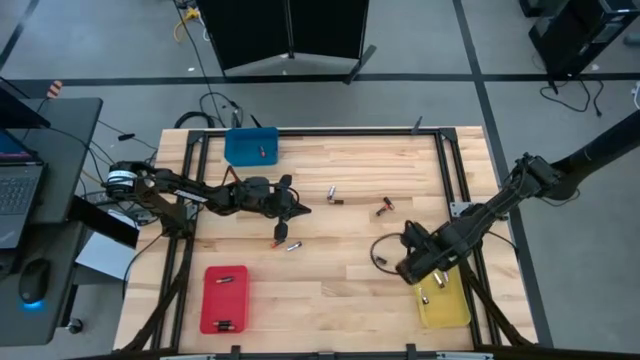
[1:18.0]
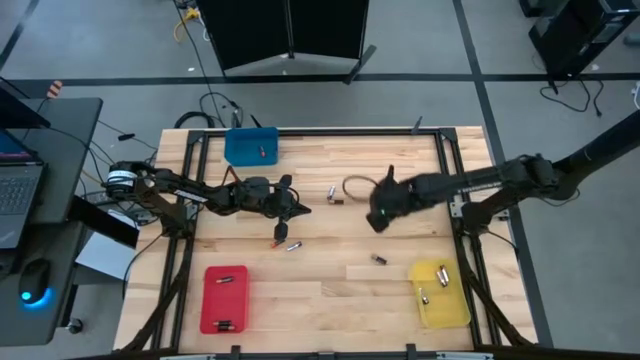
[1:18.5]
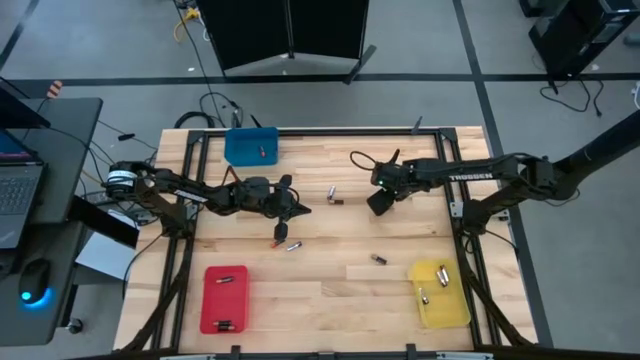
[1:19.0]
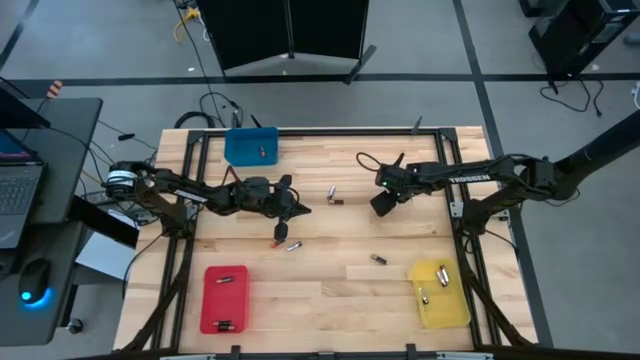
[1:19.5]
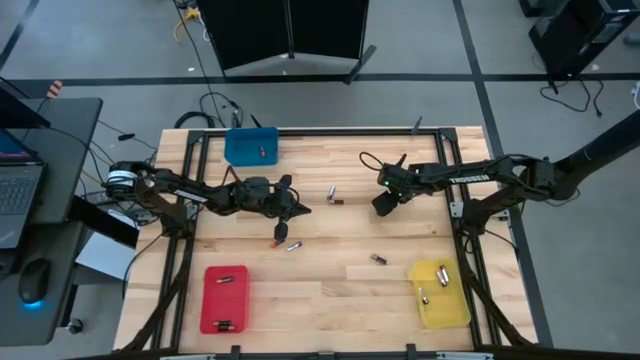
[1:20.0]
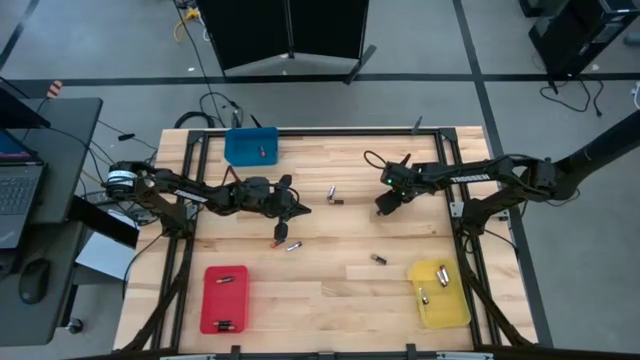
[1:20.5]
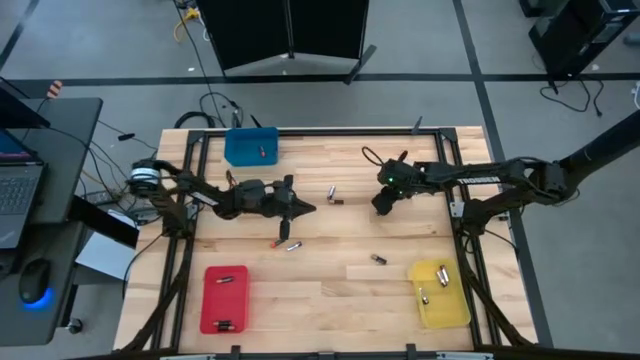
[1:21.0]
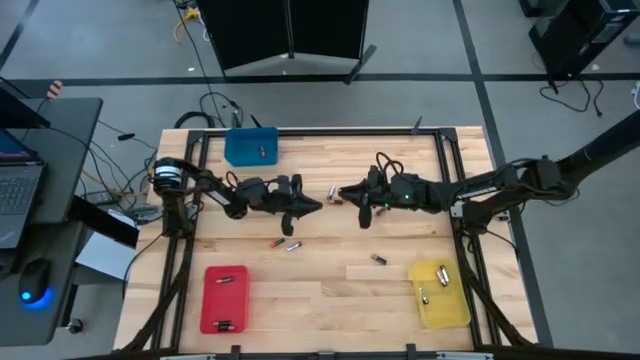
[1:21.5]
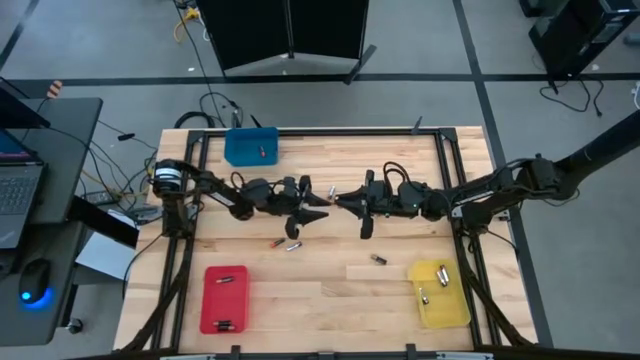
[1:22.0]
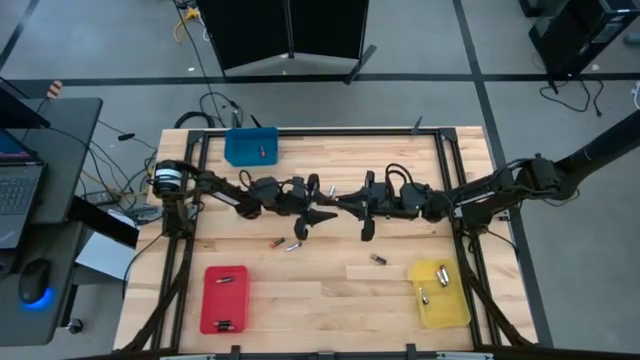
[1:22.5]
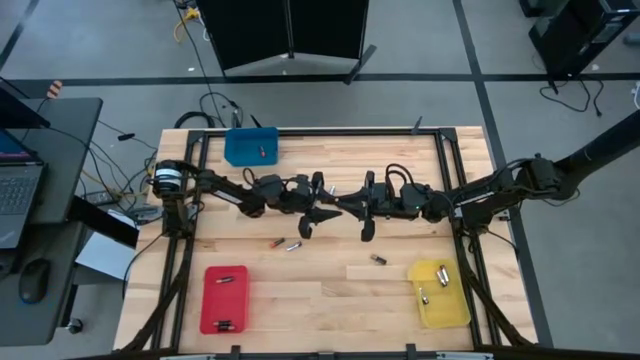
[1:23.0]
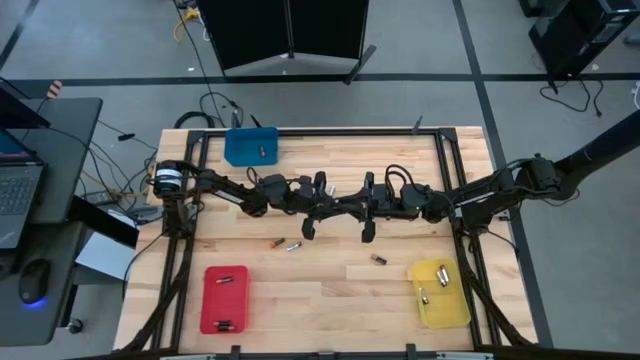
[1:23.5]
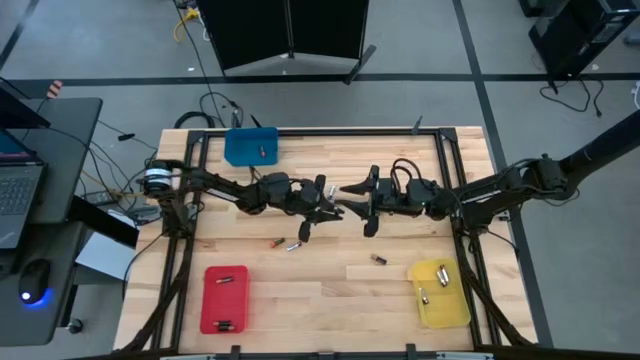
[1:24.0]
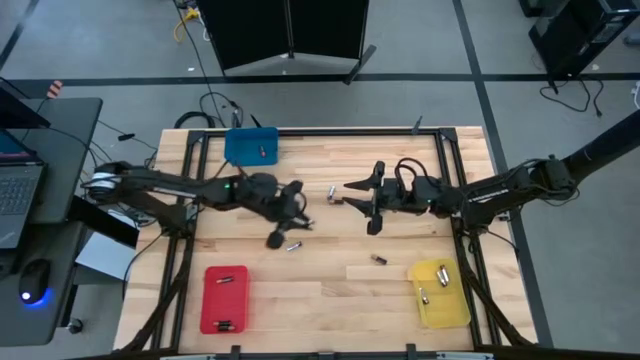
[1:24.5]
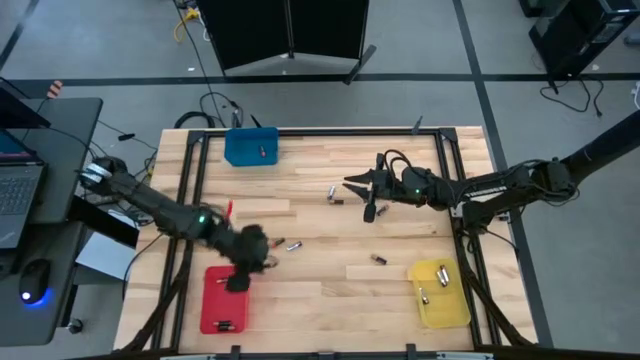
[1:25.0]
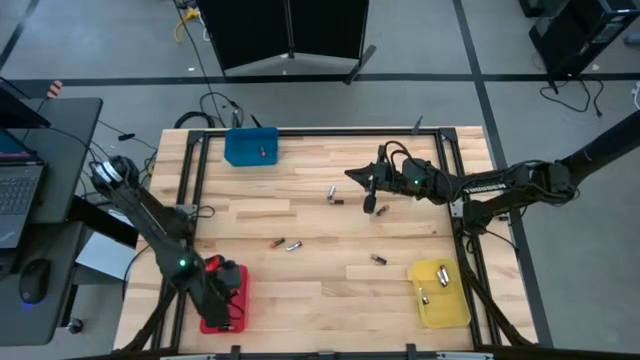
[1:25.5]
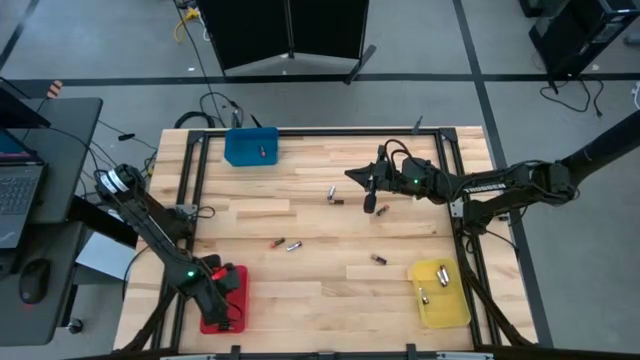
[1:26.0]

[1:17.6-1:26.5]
Task: Sort batteries
Put the brown battery into the red bin

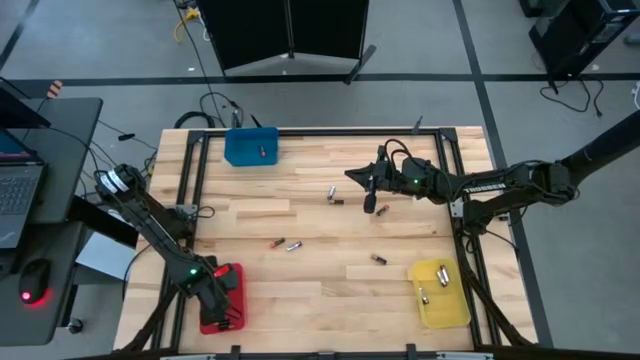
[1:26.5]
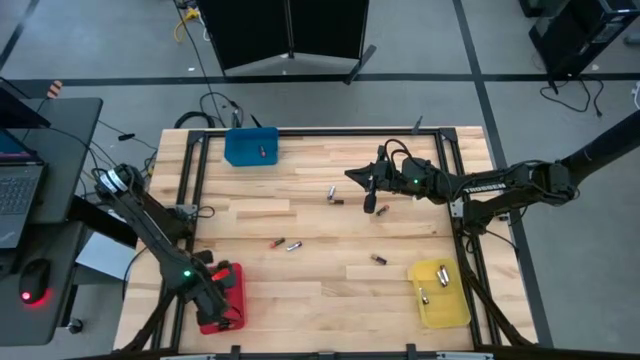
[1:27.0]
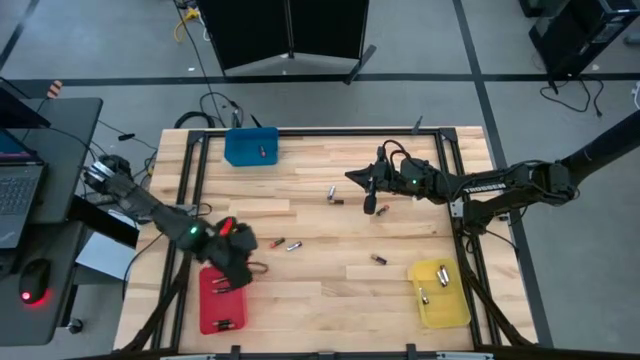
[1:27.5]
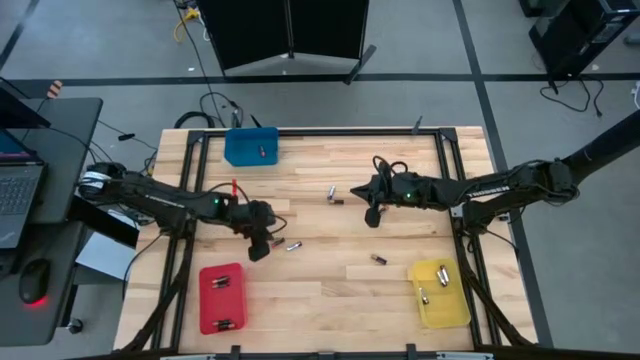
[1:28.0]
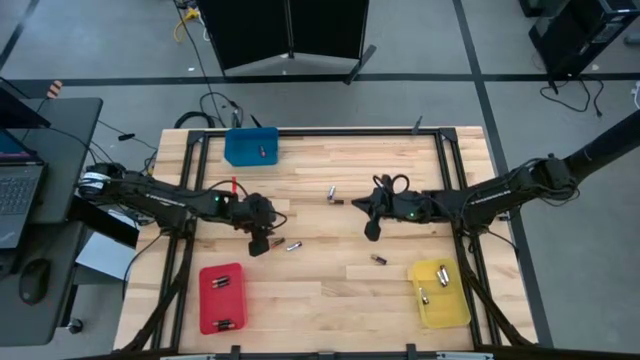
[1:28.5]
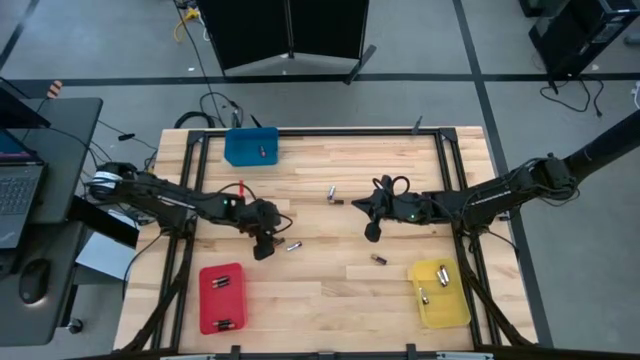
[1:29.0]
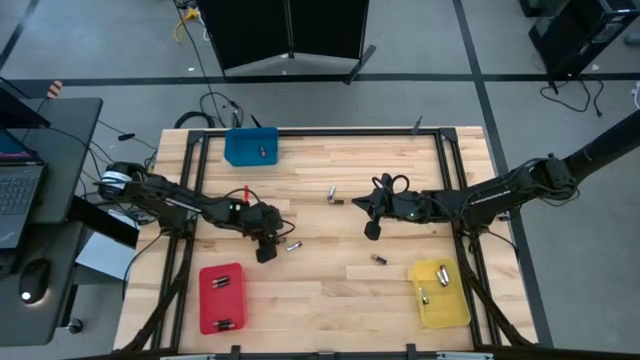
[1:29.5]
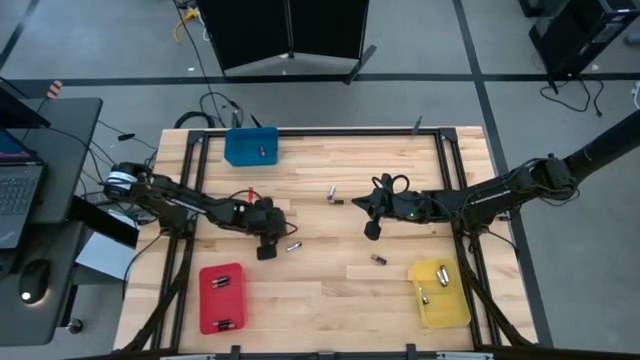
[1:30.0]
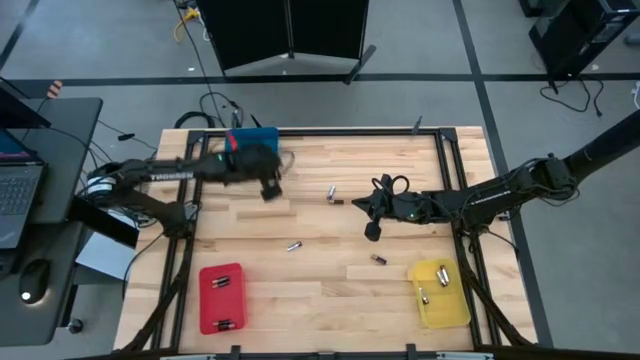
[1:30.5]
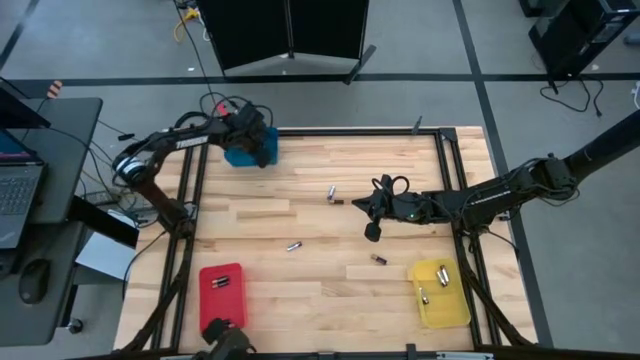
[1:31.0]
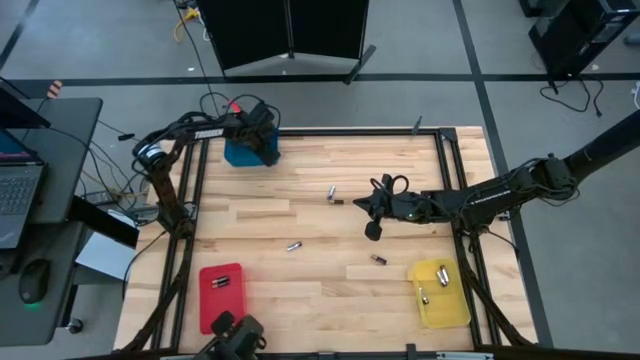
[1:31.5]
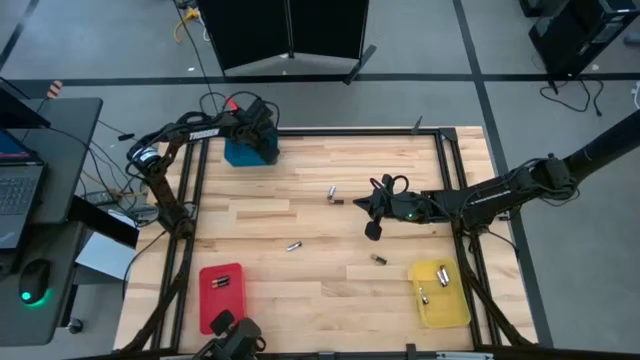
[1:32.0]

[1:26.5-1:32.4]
Put the red battery into the blue bin

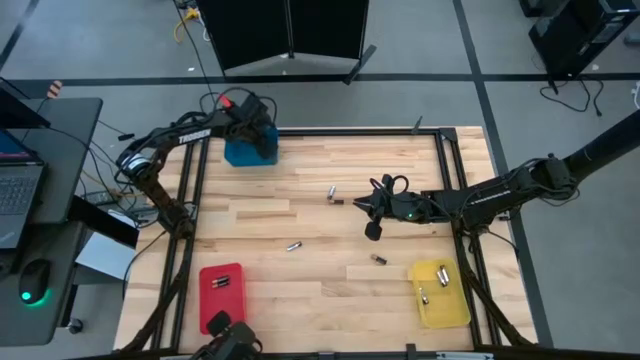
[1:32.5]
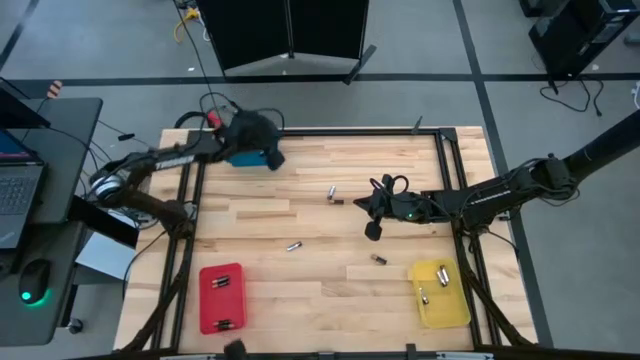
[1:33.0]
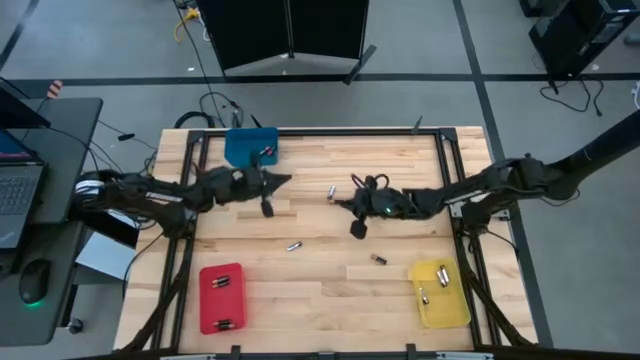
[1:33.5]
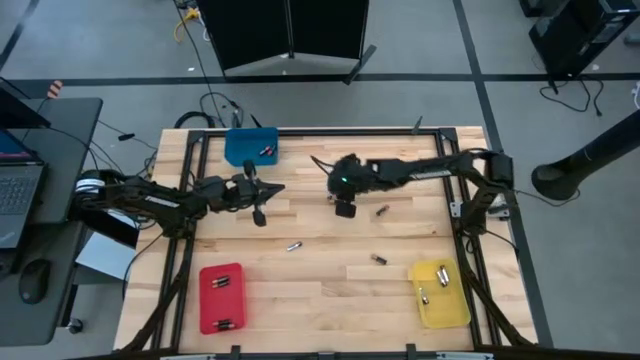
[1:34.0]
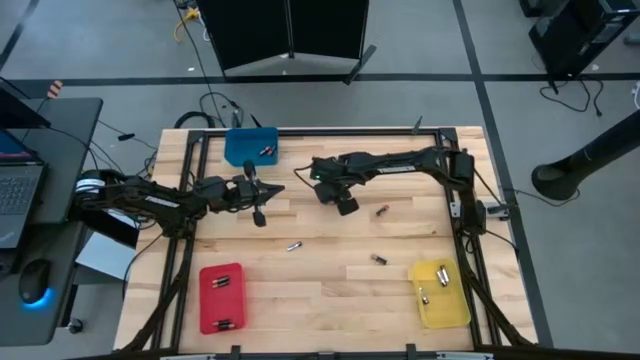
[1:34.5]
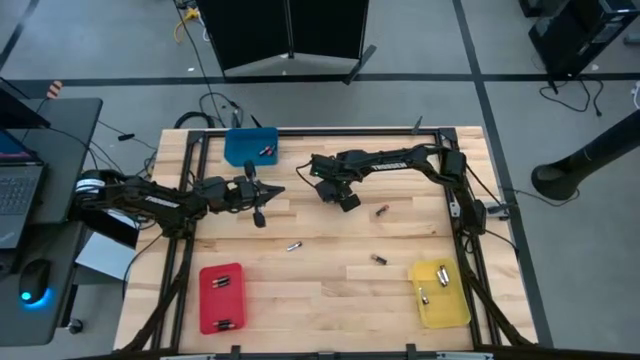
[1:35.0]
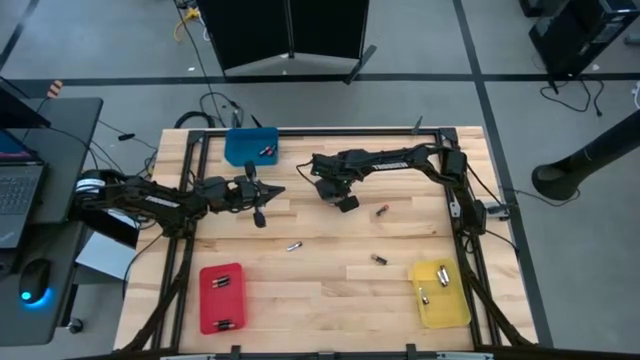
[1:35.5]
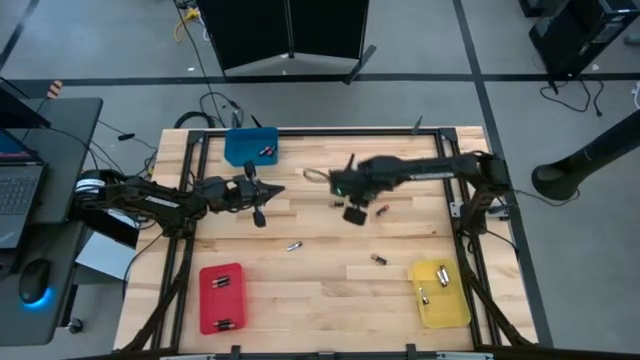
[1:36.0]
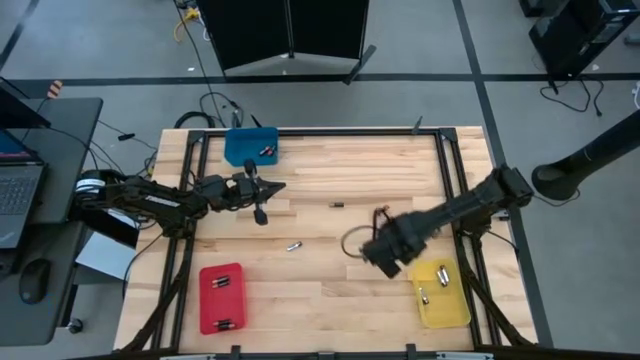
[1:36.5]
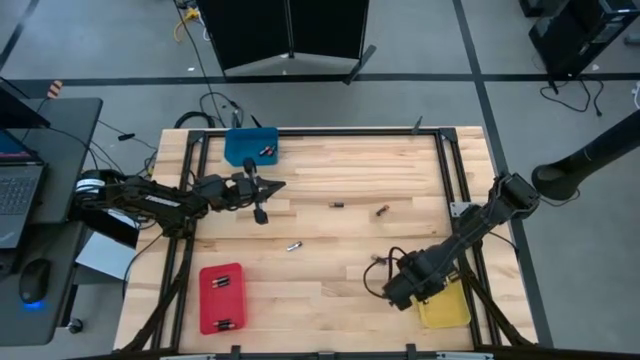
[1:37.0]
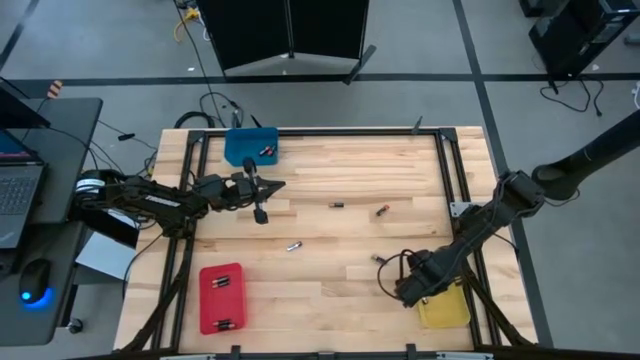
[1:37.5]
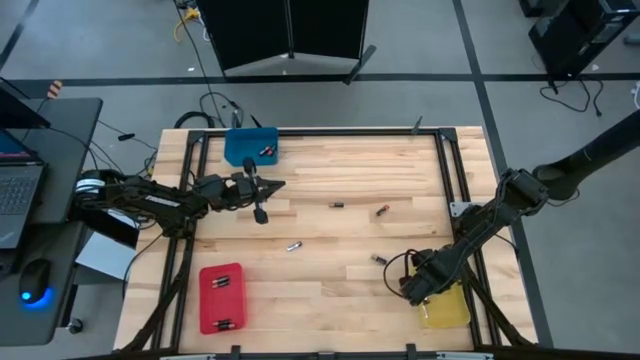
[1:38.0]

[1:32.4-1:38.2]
Put the silver battery into the yellow bin

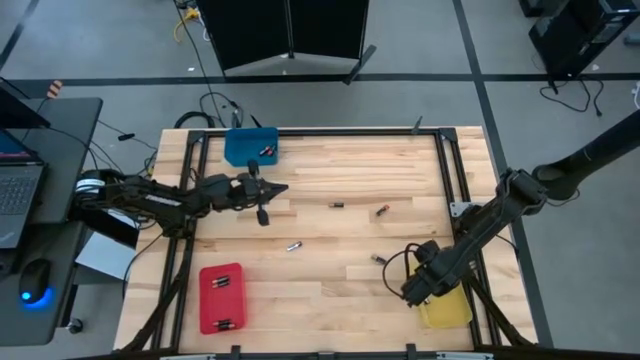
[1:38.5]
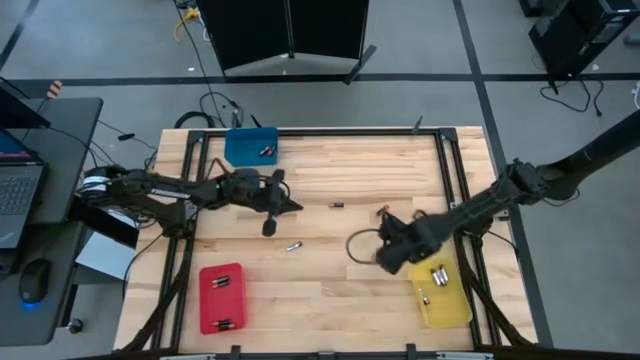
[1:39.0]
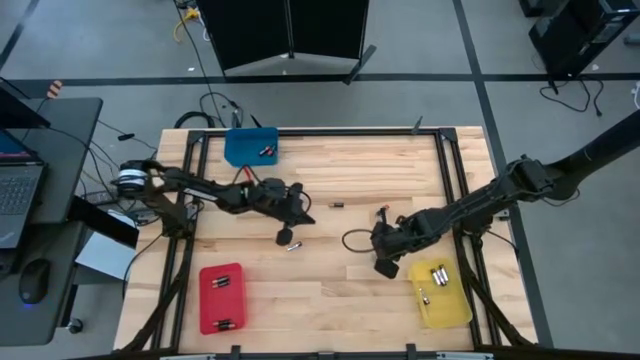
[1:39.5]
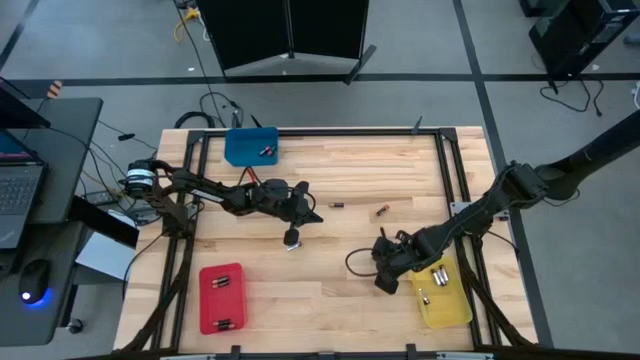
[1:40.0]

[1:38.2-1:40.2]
Put the brown battery into the red bin
